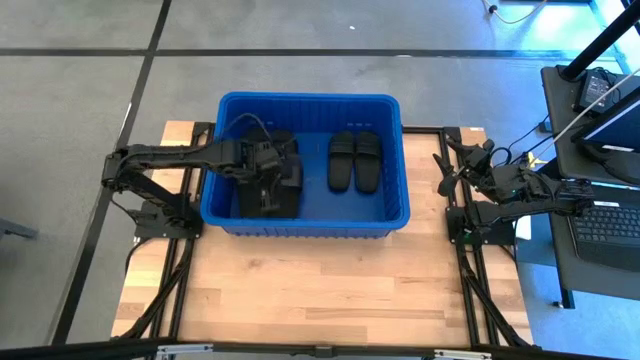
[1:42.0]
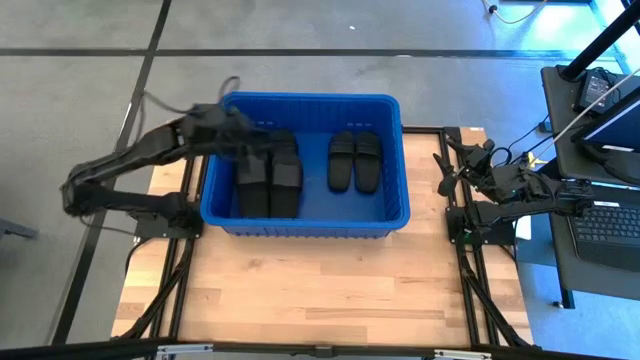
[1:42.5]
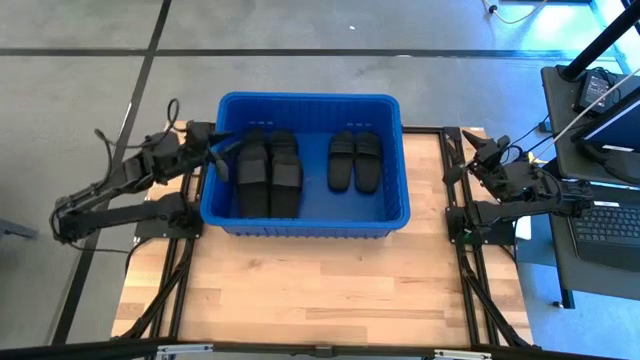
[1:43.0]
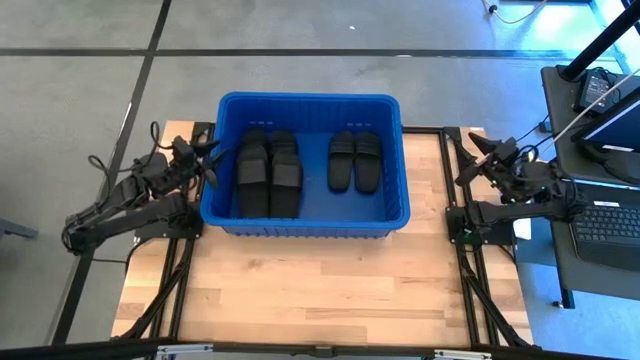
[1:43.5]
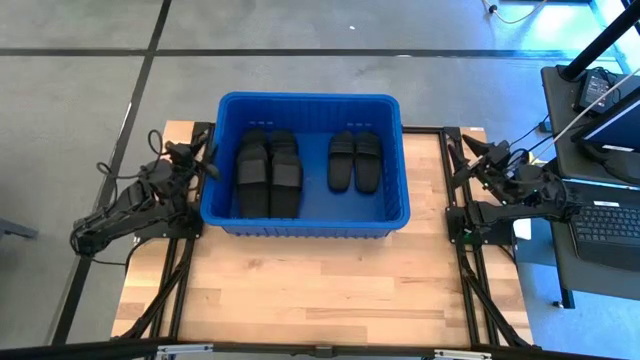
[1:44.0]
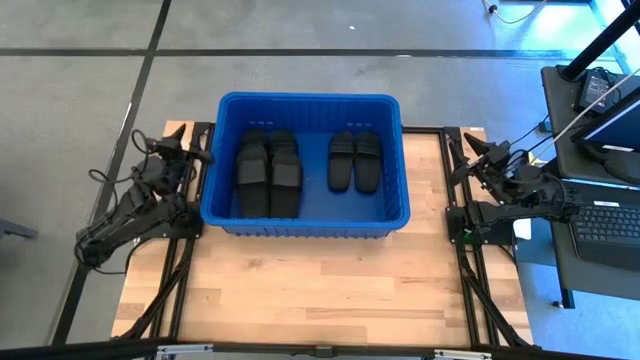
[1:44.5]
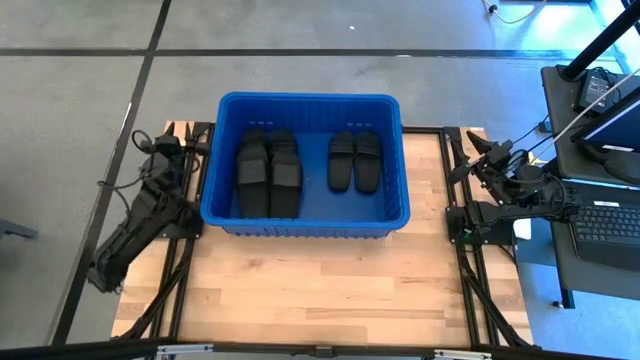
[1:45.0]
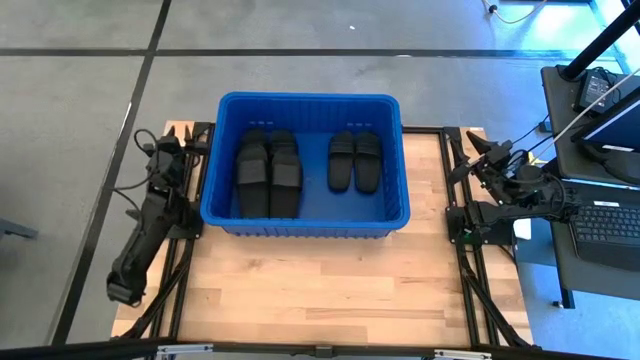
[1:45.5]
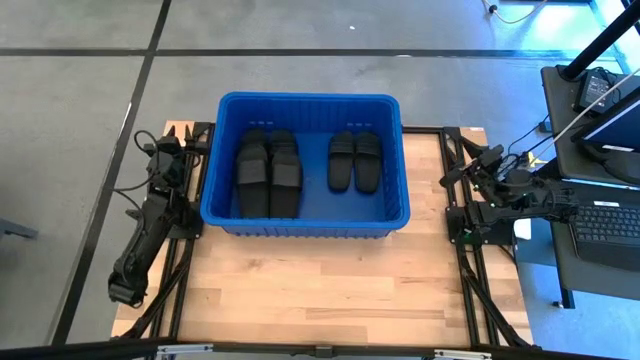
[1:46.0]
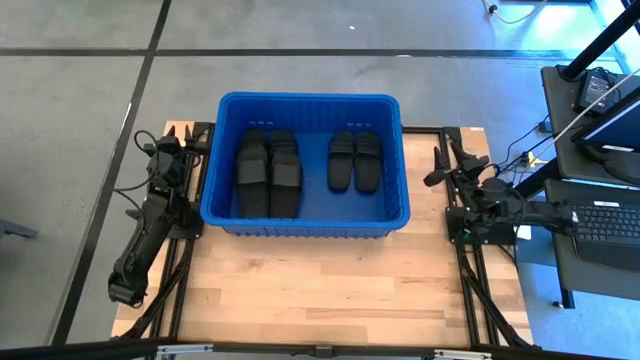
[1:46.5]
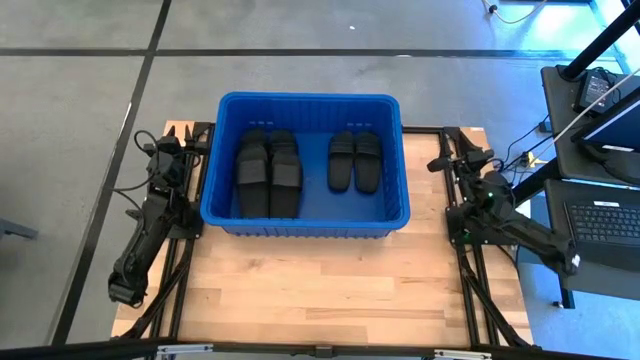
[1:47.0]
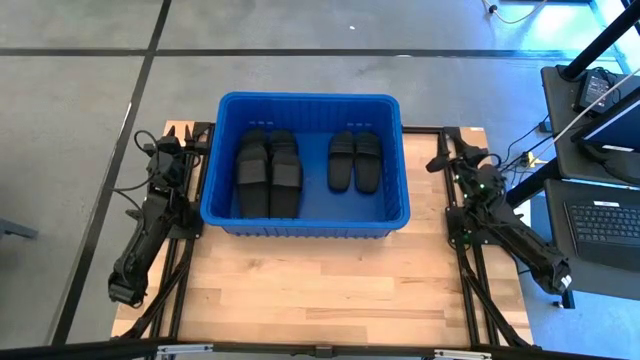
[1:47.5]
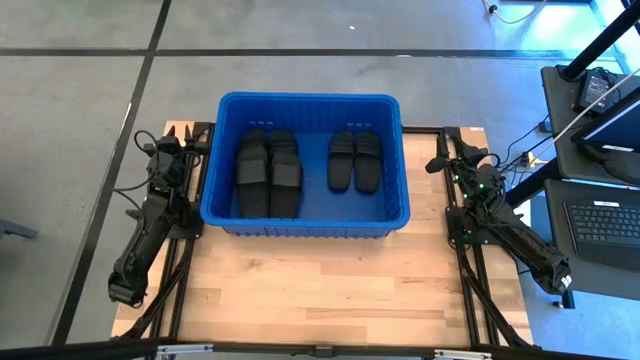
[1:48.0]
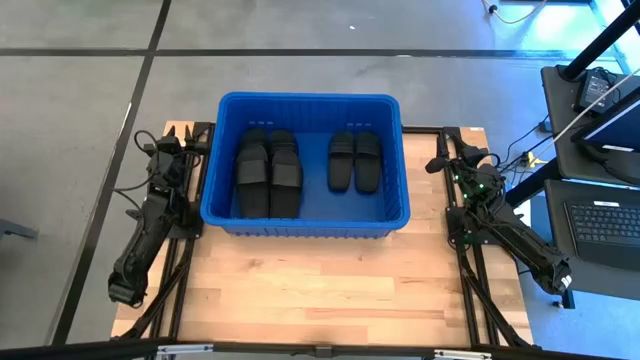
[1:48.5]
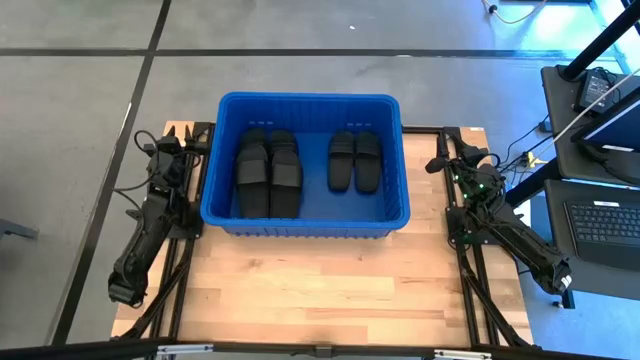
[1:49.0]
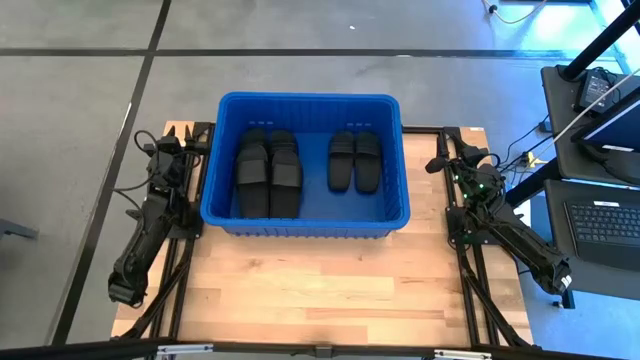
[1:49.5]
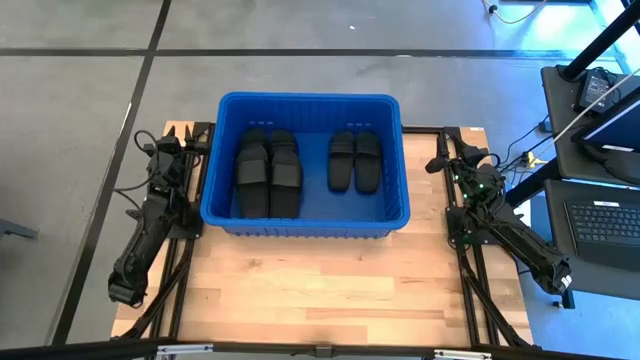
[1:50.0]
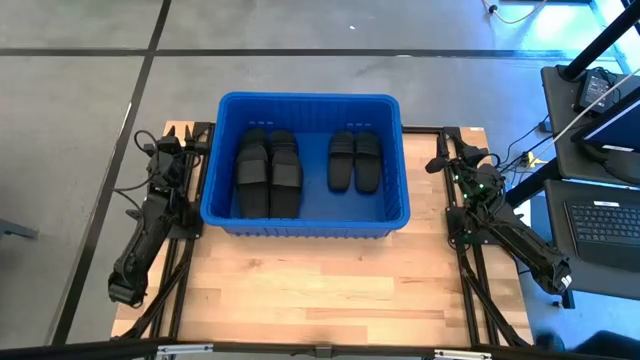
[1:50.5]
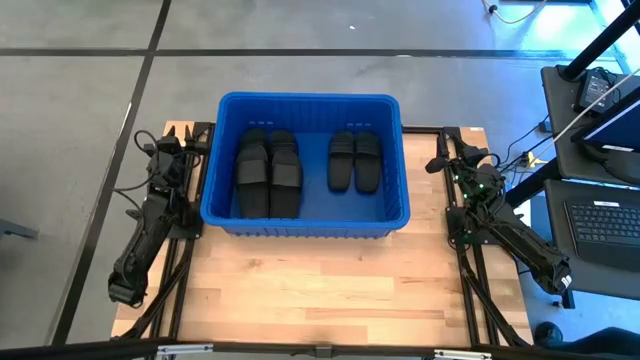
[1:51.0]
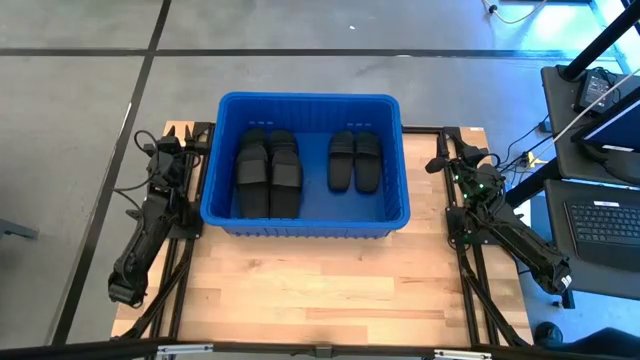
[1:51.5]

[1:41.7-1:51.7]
Task: Pick and place slides into bin
Return to Home Position

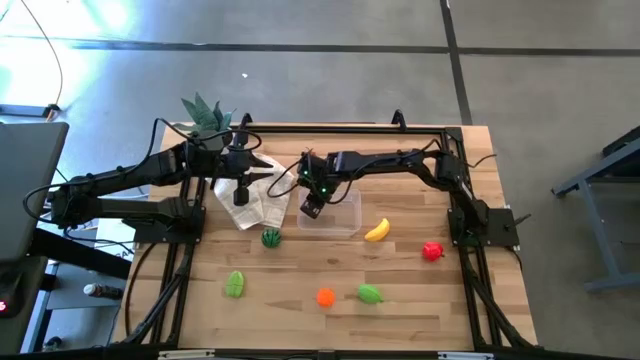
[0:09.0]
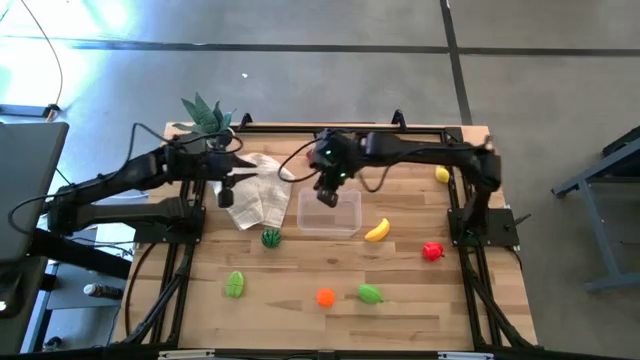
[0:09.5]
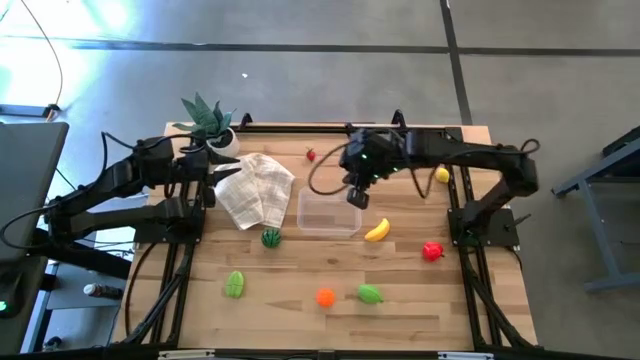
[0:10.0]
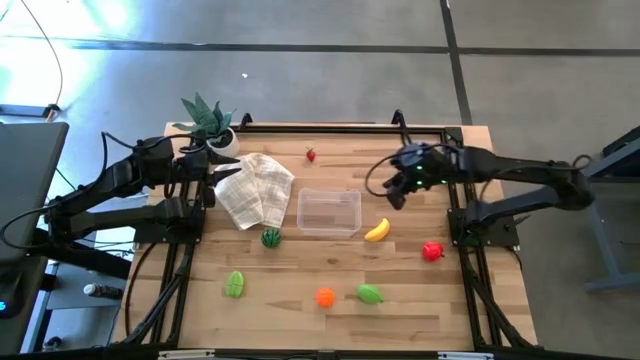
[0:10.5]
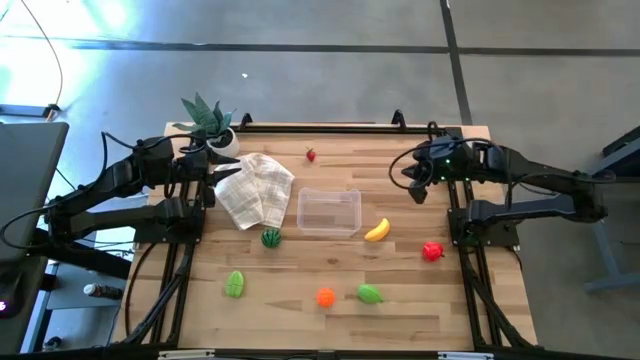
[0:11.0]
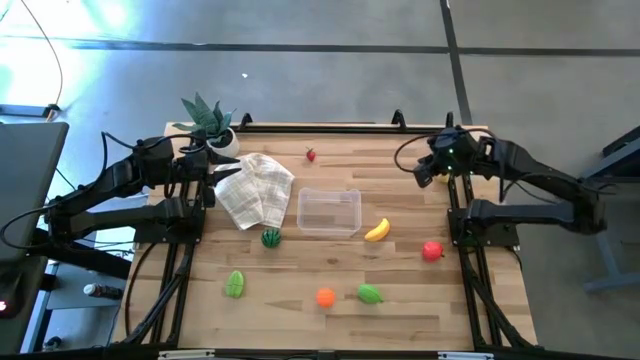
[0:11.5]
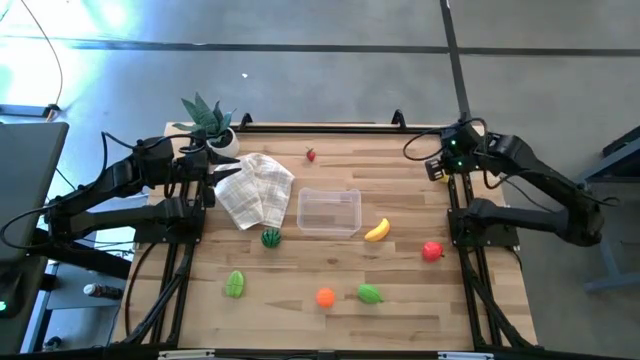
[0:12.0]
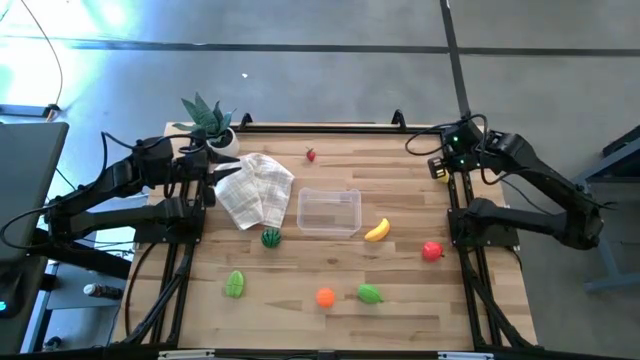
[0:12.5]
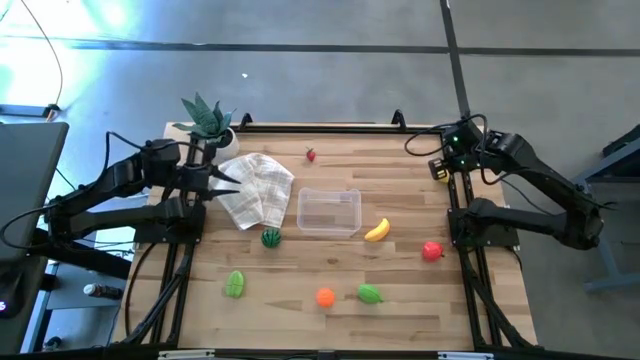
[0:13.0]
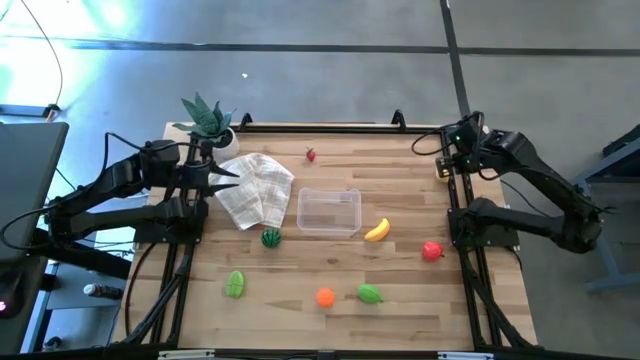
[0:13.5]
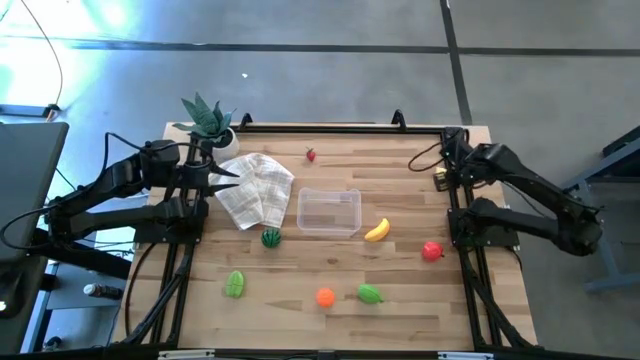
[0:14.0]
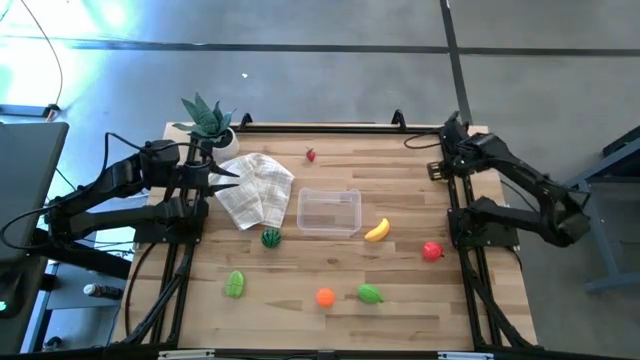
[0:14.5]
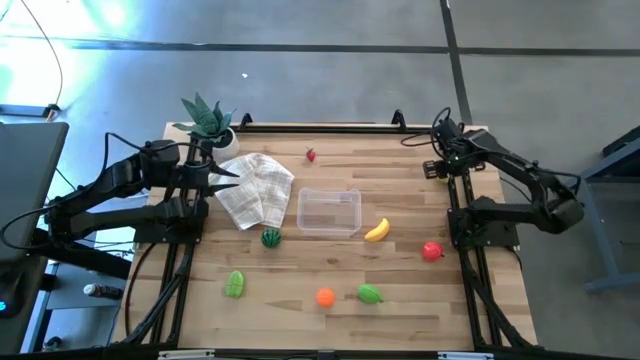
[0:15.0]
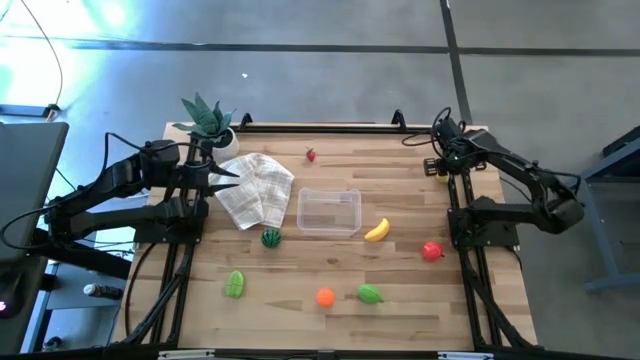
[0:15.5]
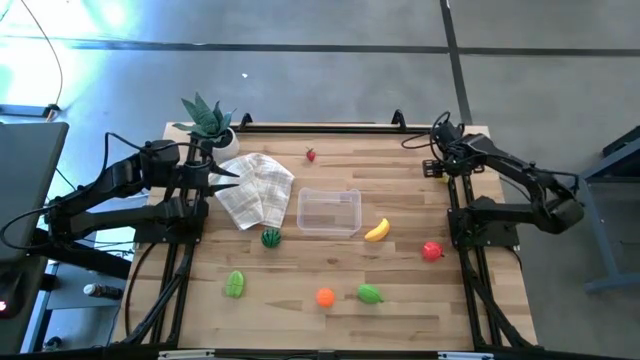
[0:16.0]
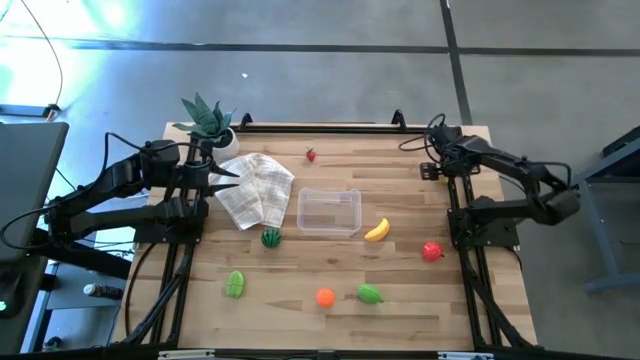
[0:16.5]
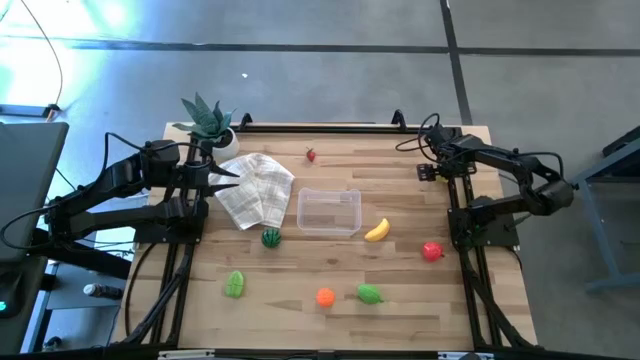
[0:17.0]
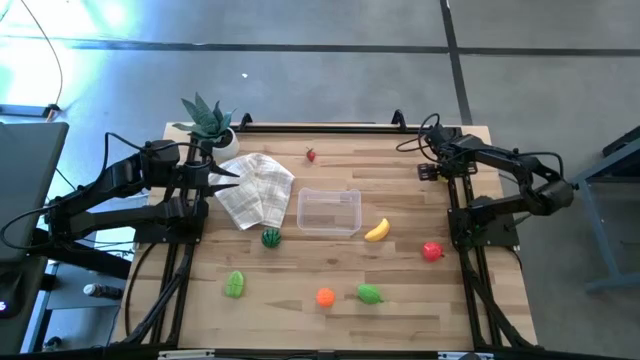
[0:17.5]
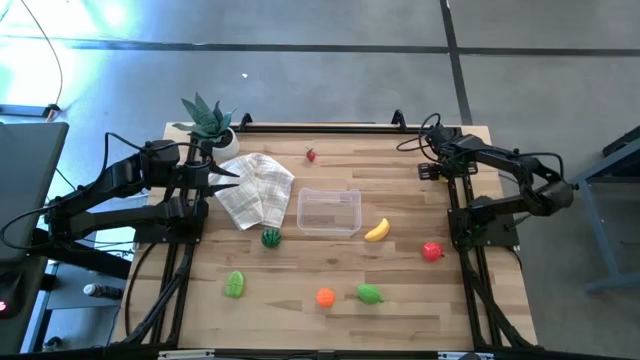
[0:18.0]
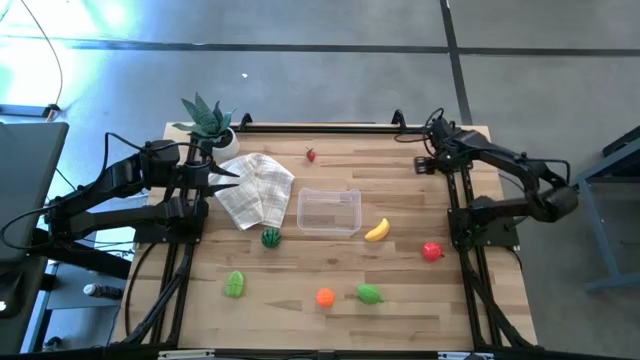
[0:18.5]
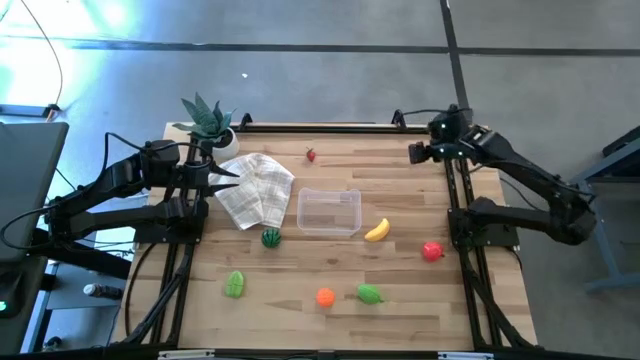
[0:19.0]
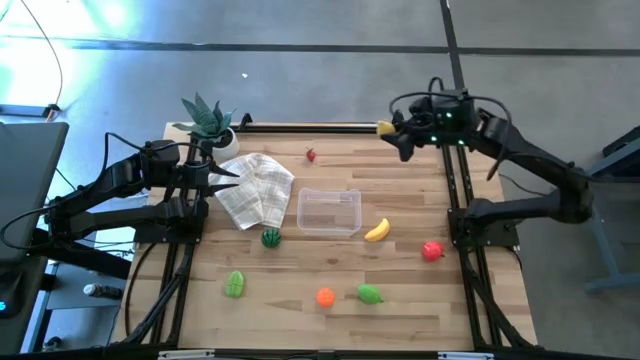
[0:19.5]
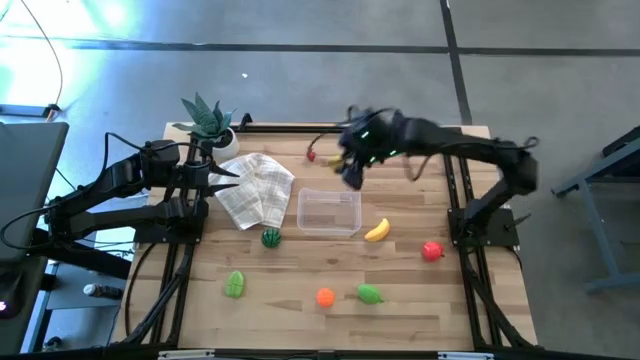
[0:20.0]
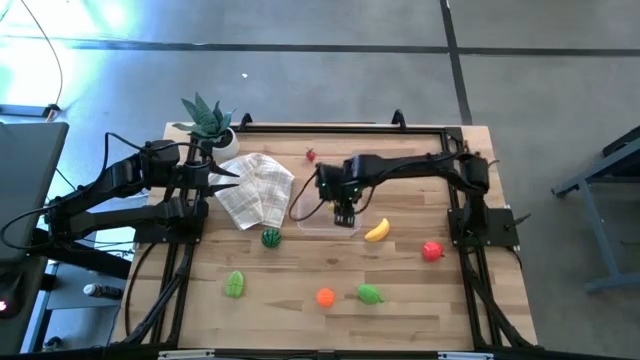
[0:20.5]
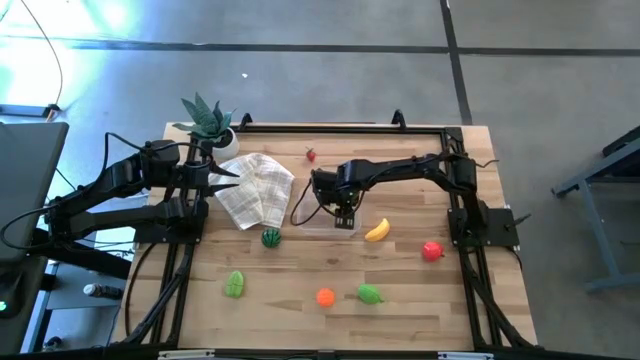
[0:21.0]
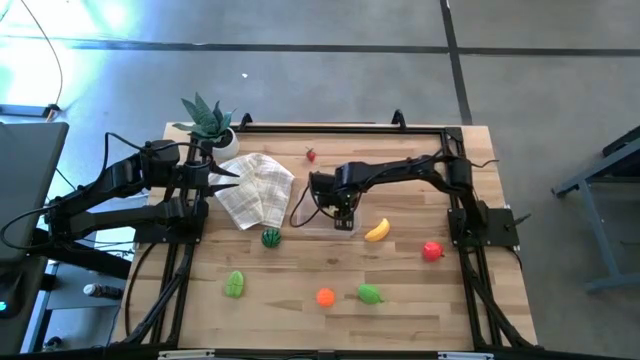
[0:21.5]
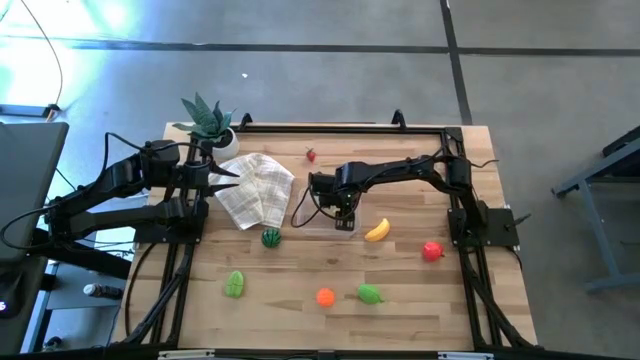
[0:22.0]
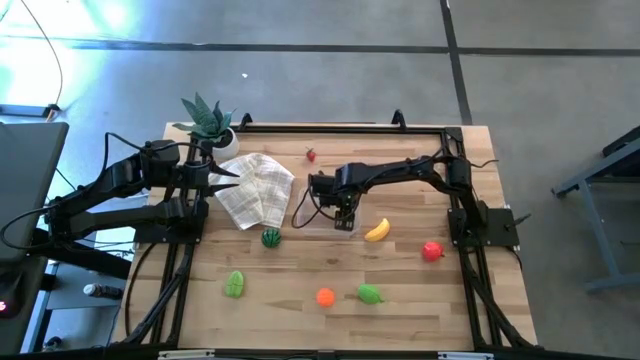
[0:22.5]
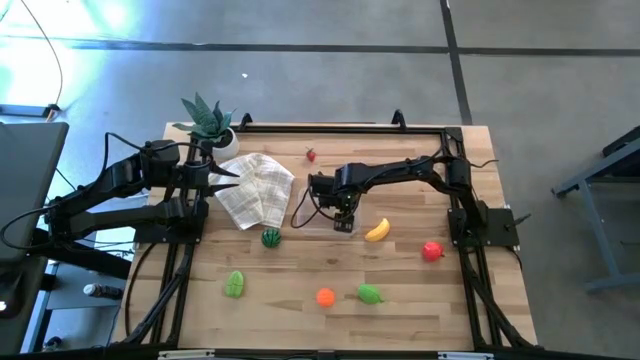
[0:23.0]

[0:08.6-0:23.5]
Task: Pick and placing Produce into tupperware
Put the yellow lemon into the transparent container
